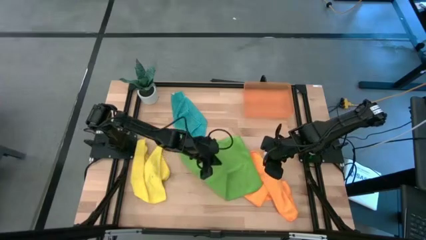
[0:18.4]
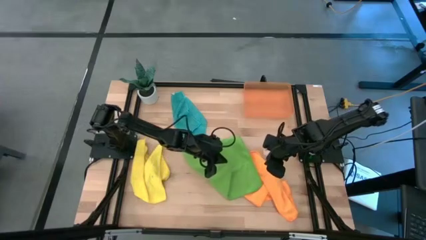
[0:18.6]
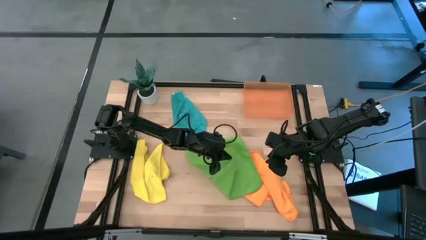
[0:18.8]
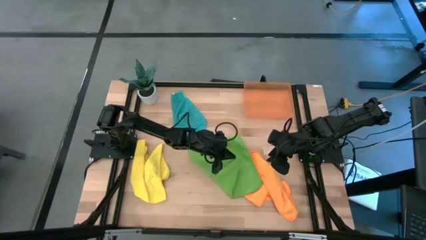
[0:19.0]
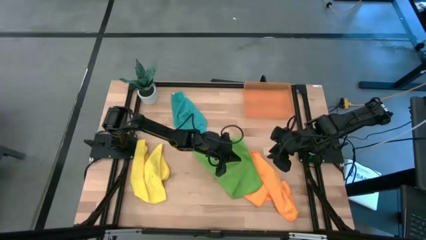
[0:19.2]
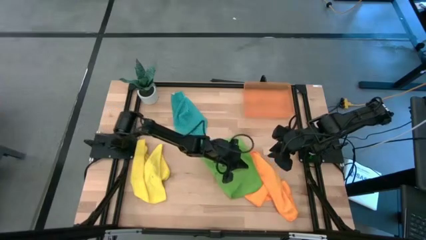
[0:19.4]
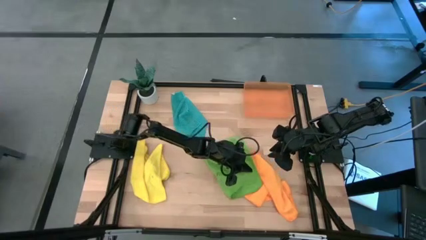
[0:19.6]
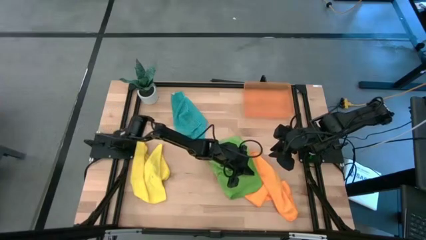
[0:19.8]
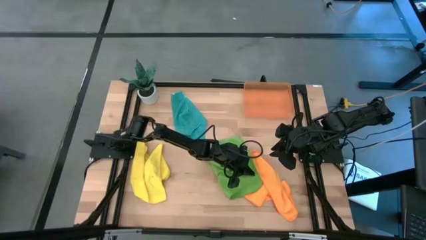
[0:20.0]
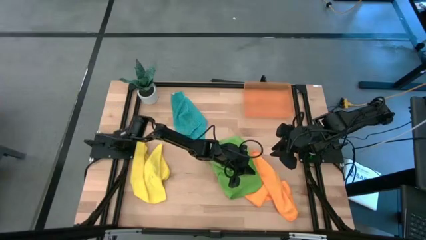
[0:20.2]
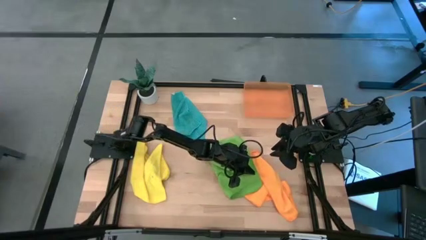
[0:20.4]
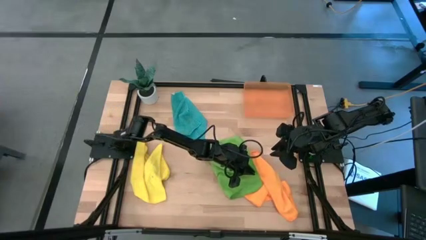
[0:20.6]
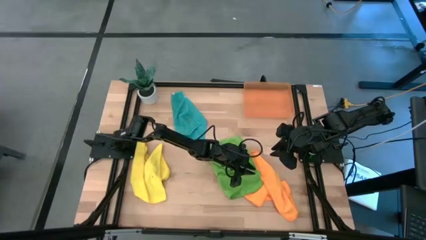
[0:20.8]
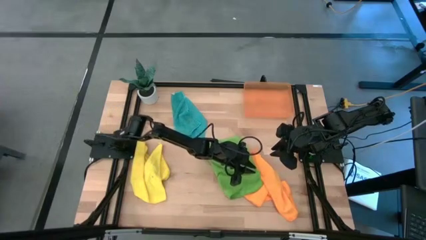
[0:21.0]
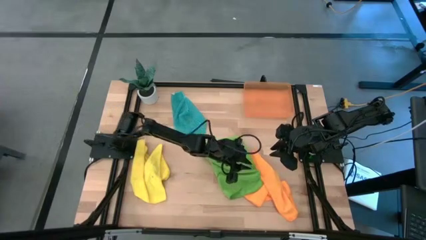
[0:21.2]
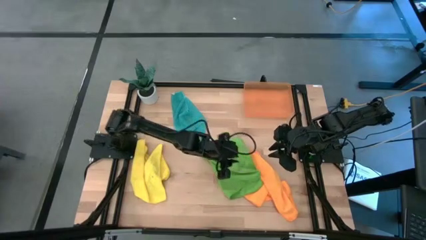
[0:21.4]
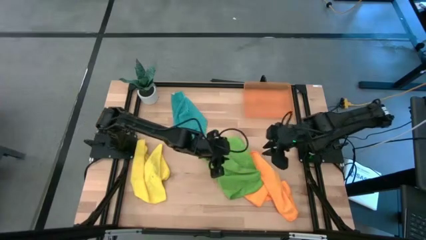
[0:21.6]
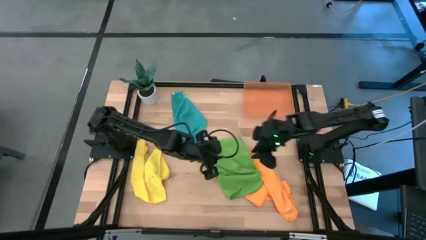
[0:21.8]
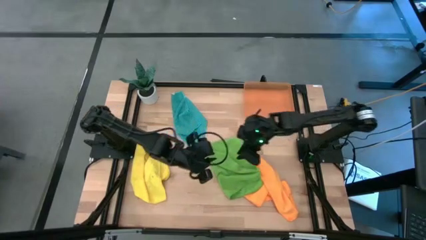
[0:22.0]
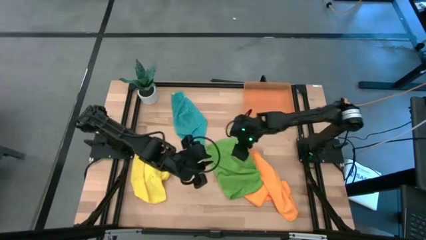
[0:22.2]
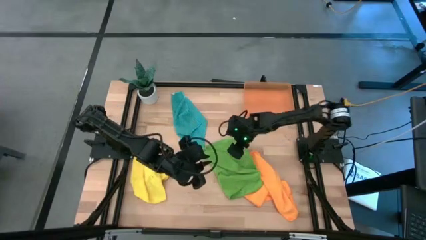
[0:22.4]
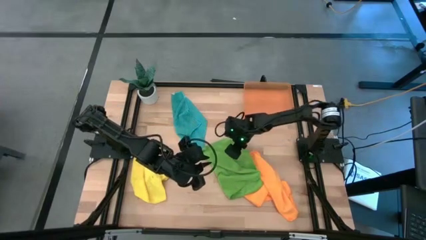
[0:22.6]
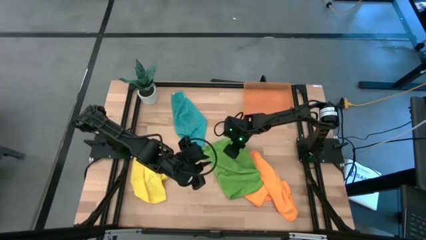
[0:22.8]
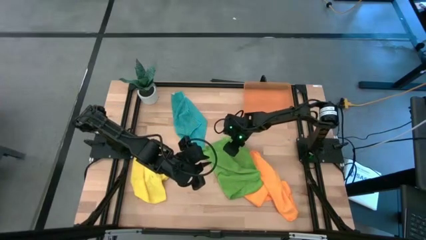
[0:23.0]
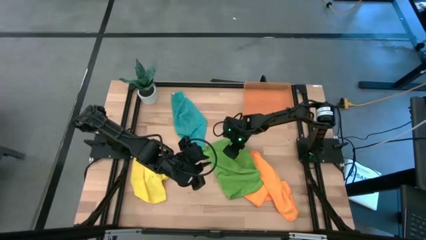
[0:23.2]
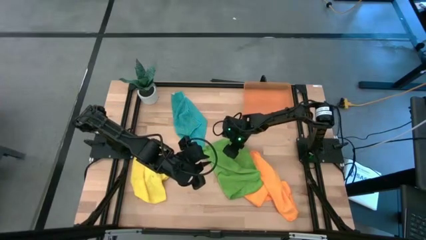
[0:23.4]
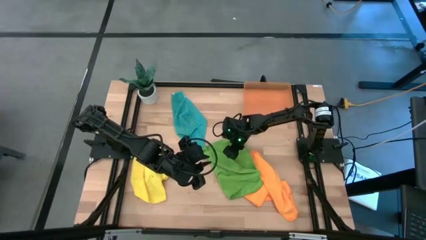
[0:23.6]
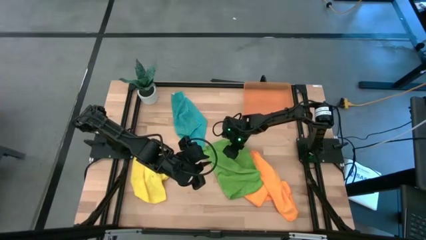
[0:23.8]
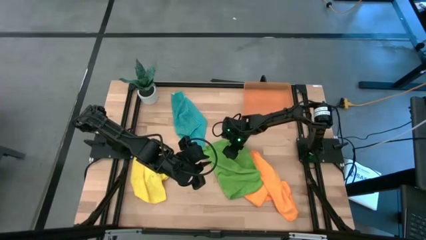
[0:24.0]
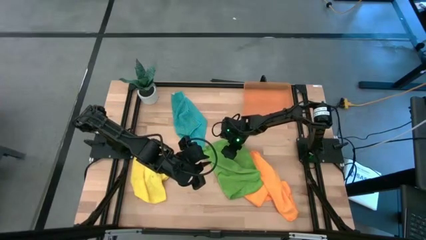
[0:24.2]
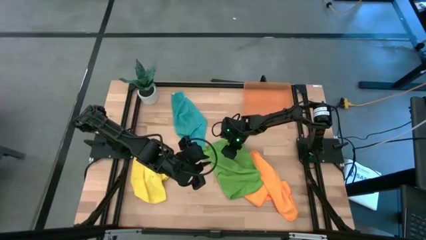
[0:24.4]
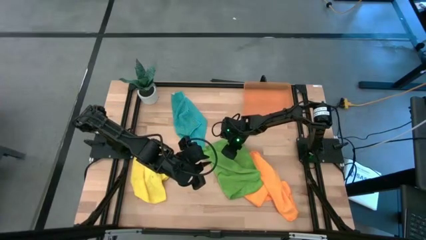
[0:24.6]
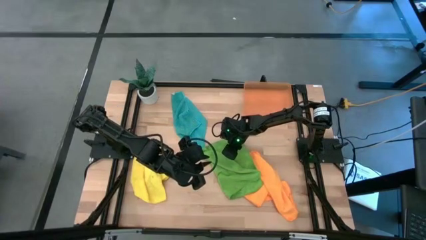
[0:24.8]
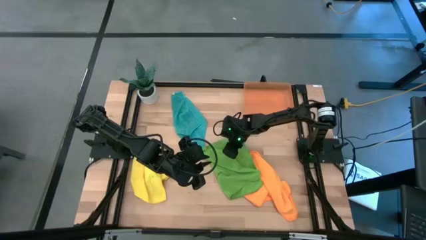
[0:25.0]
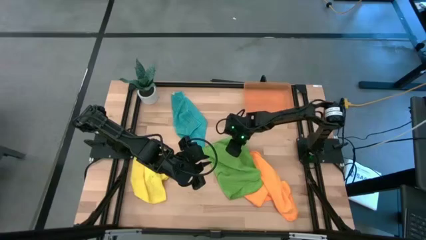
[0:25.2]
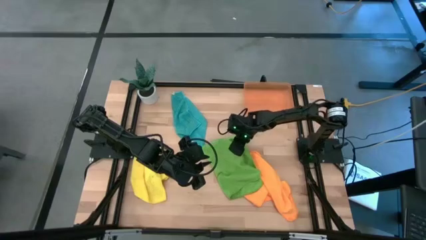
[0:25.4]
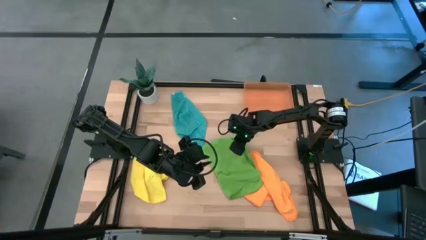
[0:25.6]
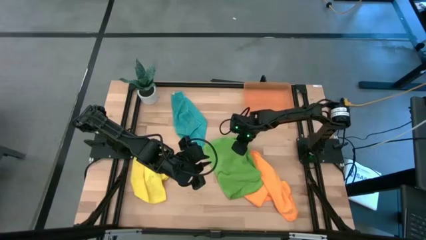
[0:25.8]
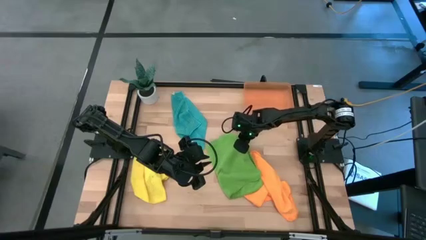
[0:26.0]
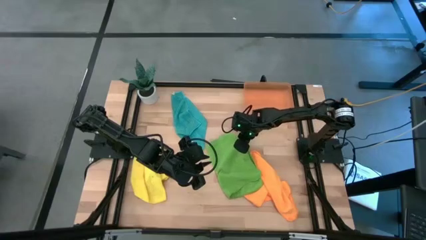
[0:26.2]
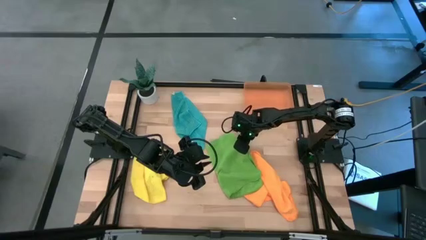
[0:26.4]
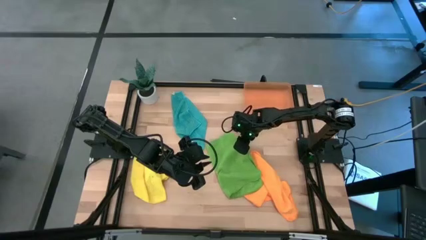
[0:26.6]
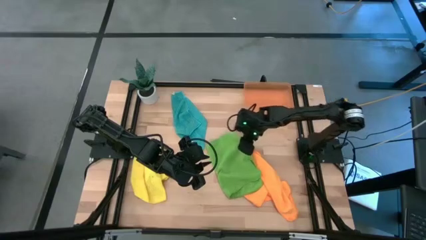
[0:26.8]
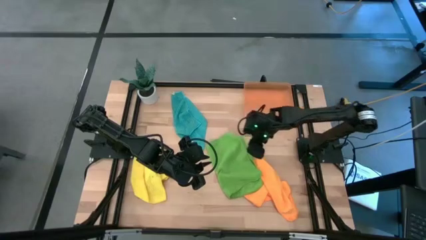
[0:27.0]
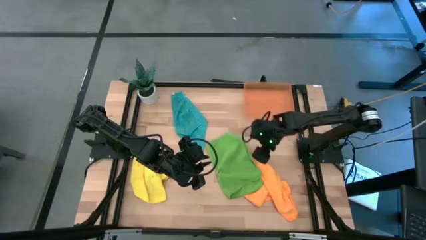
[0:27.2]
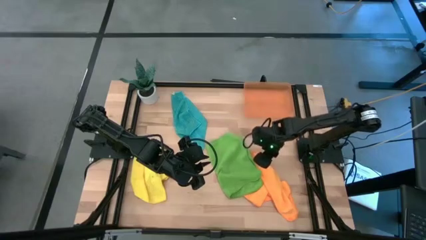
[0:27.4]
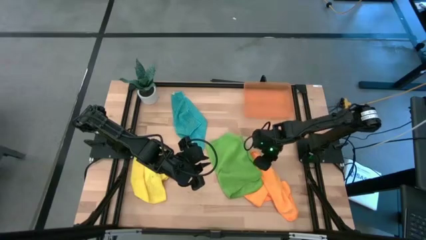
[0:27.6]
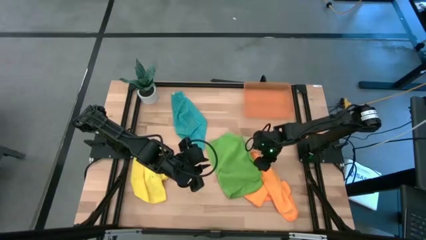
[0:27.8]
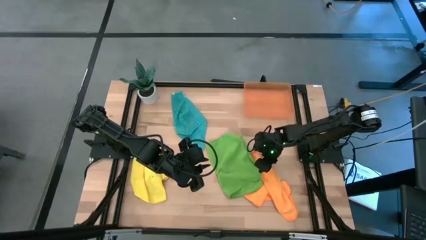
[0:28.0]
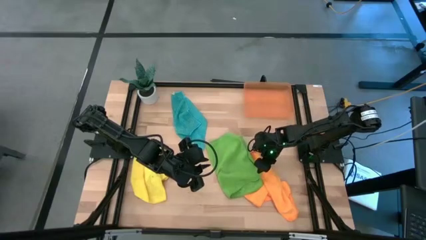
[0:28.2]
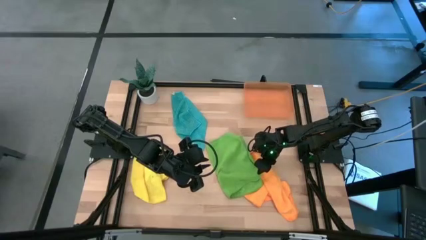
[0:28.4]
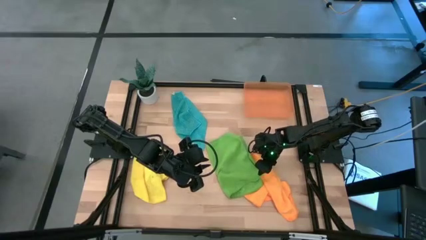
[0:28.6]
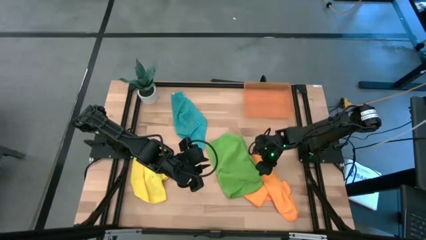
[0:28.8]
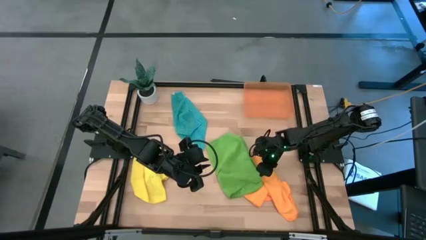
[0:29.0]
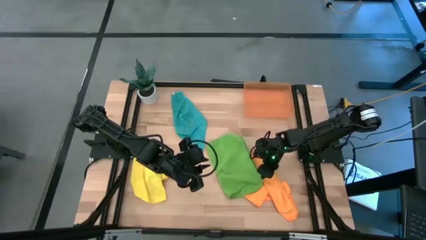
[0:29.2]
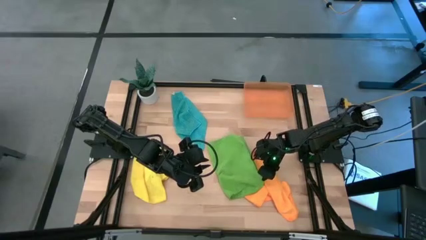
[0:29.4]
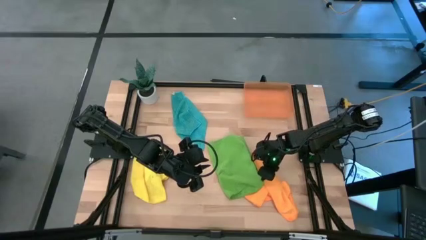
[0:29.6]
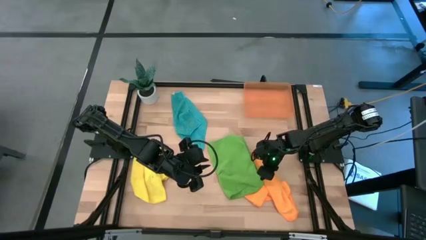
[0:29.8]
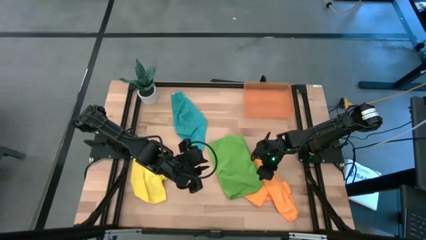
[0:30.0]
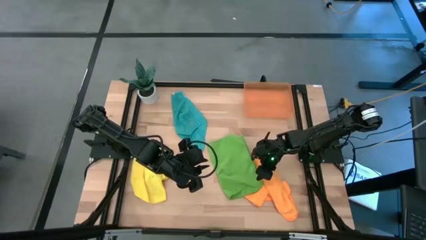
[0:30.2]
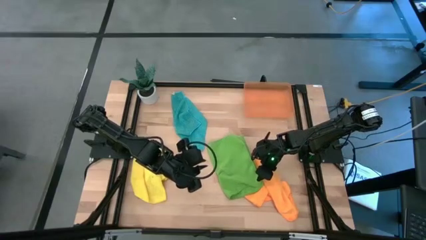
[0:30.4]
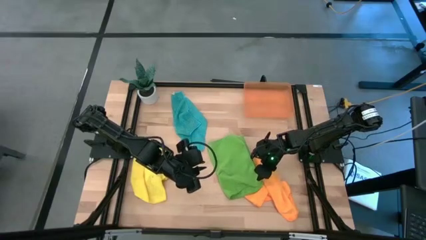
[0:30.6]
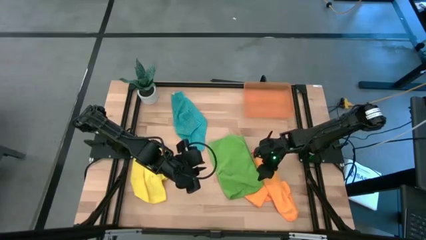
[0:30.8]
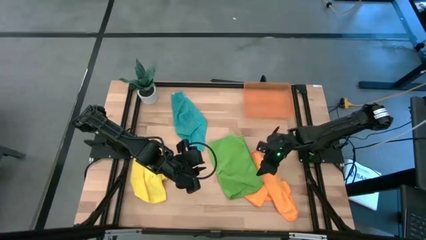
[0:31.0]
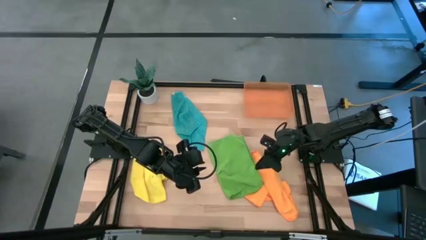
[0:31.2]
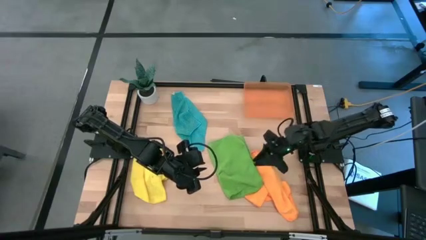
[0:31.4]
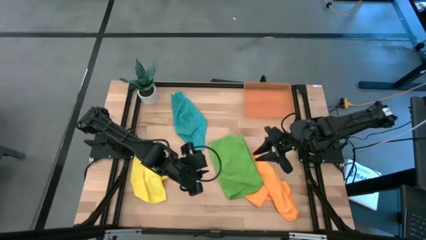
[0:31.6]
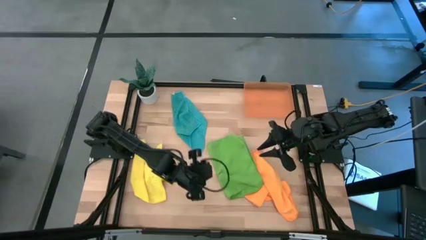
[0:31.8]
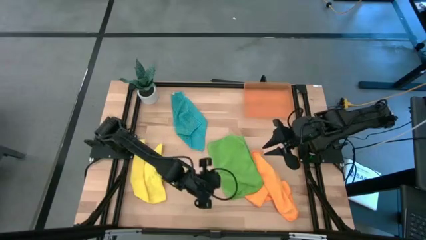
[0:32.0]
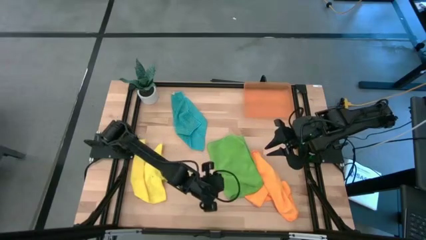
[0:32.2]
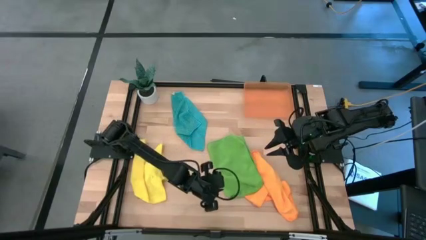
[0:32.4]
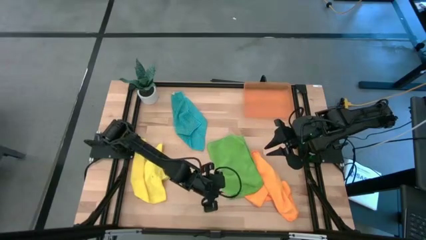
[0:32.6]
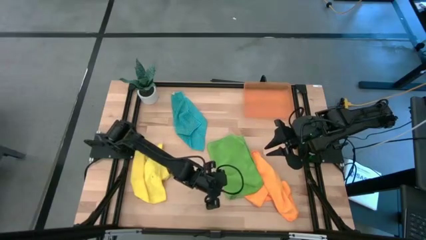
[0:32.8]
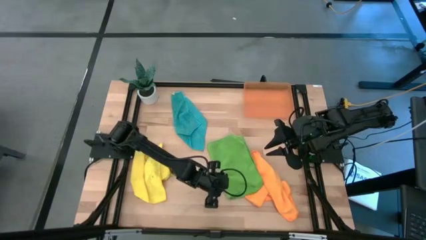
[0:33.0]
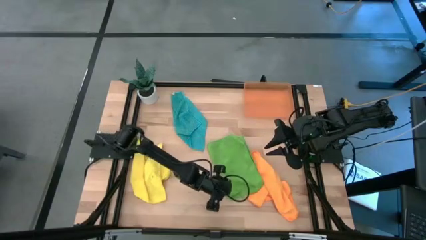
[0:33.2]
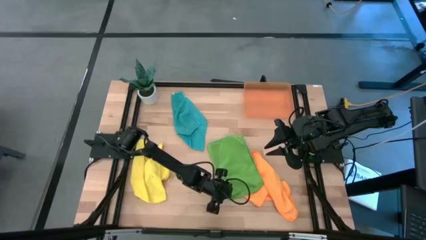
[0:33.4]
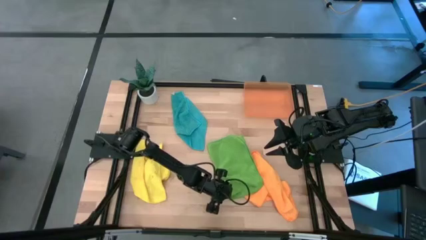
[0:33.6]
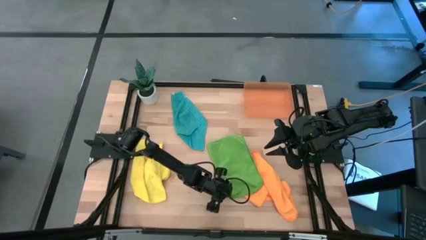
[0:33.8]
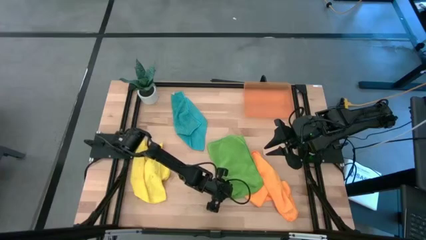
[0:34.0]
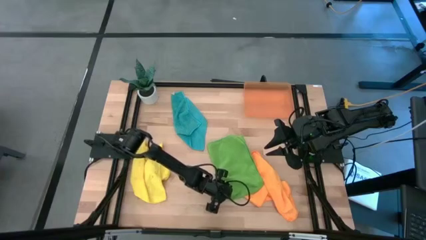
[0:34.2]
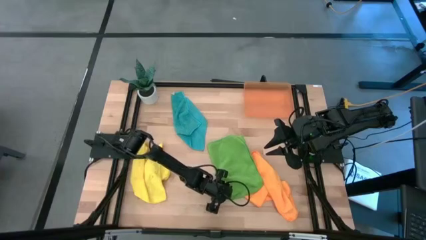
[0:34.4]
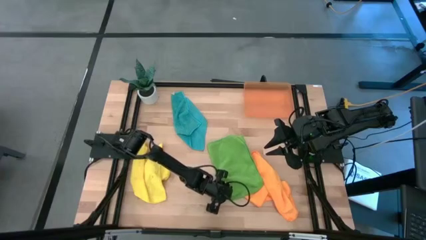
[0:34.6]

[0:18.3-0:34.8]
Task: Roll microfiber towels into tight, uniform cylinder then place into a basket
Fold the green towel
